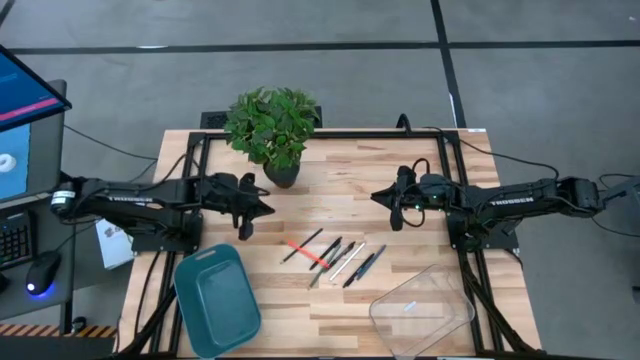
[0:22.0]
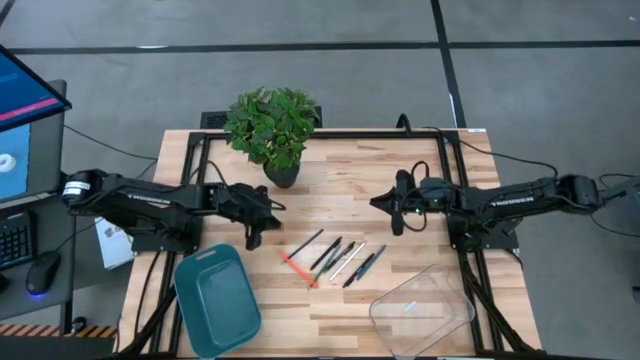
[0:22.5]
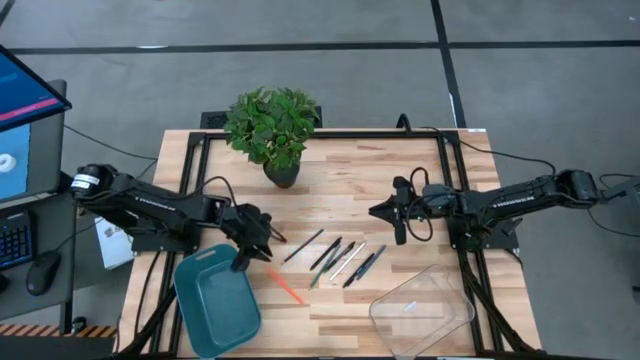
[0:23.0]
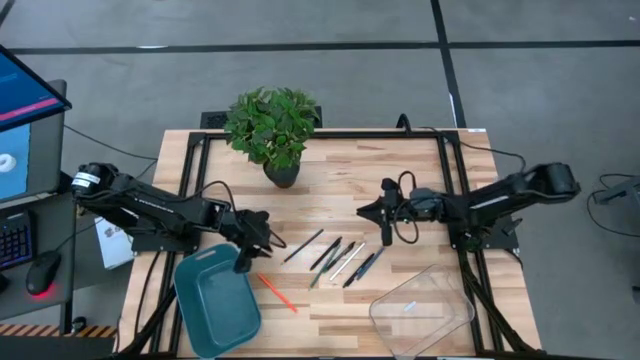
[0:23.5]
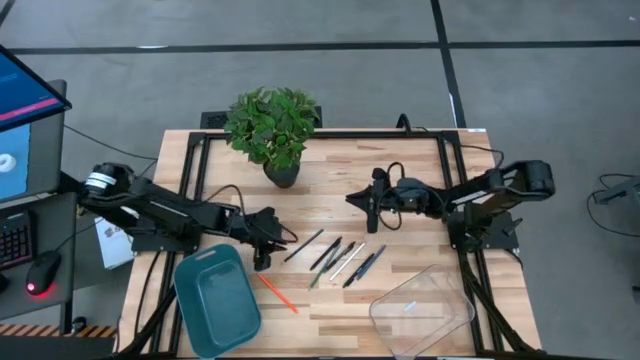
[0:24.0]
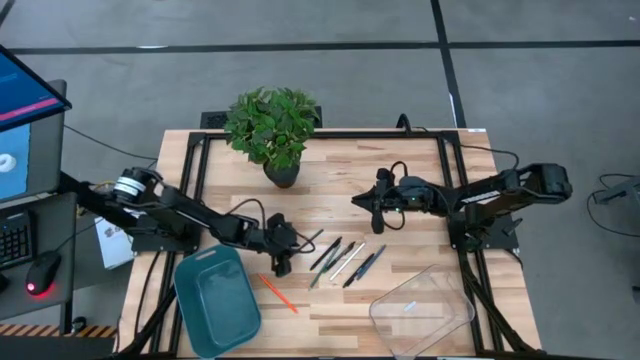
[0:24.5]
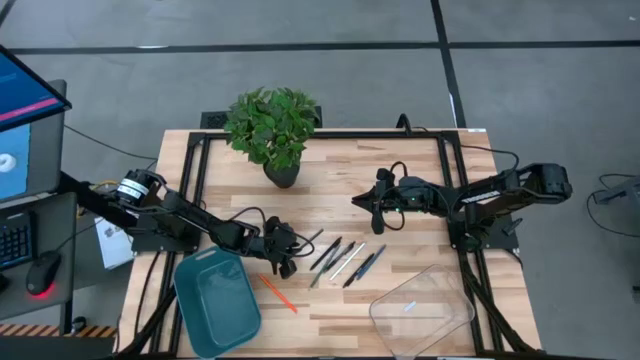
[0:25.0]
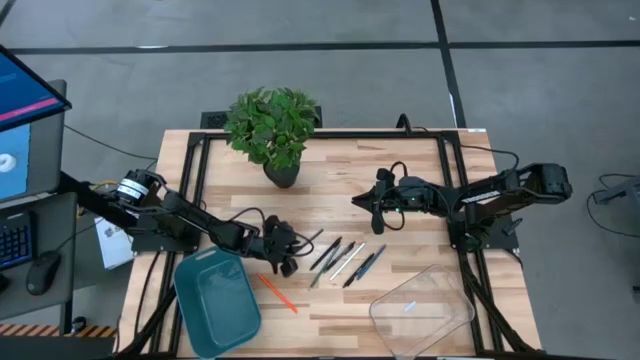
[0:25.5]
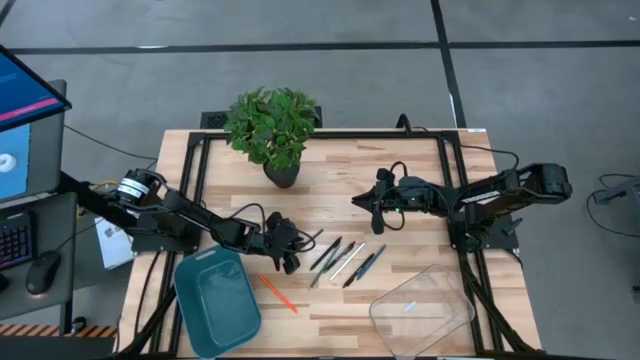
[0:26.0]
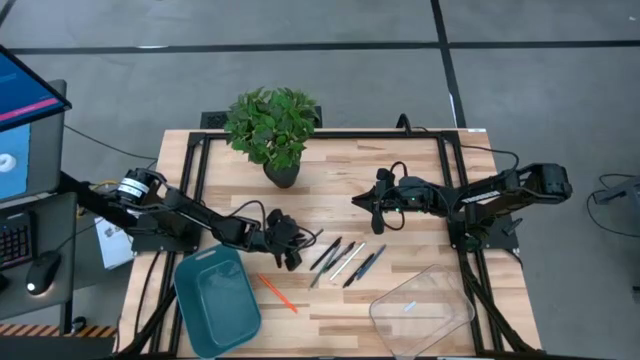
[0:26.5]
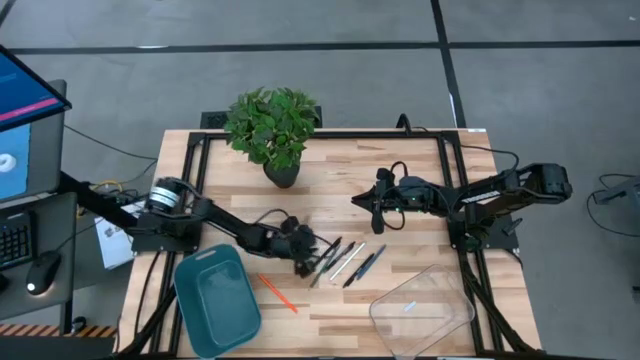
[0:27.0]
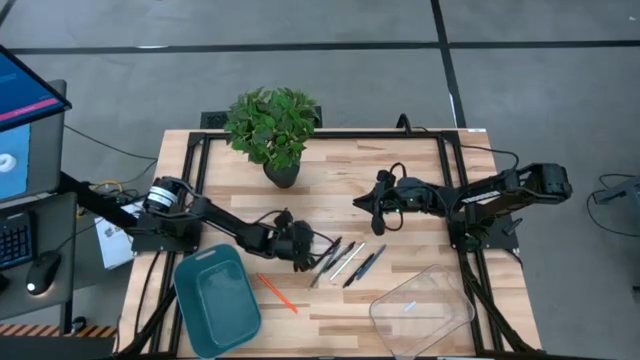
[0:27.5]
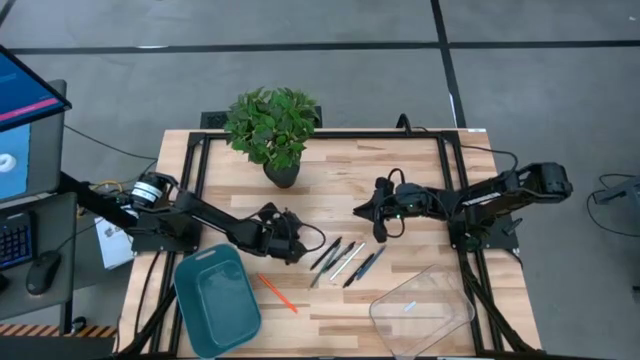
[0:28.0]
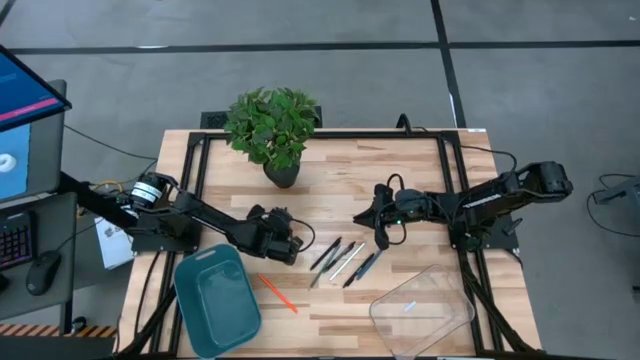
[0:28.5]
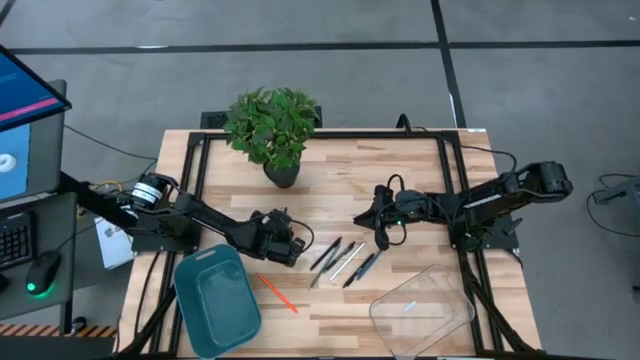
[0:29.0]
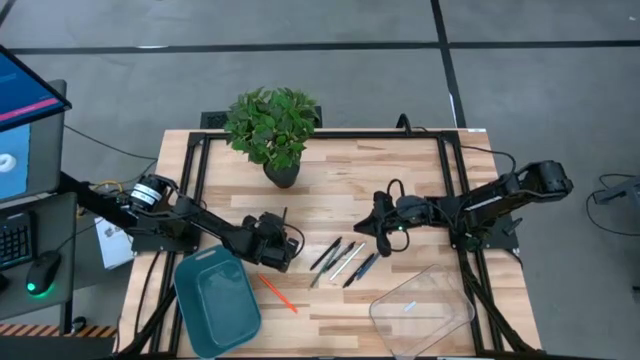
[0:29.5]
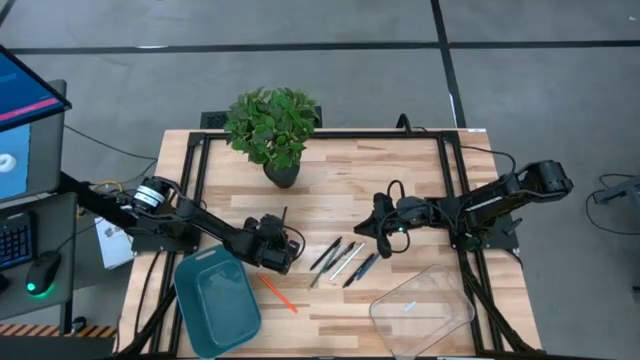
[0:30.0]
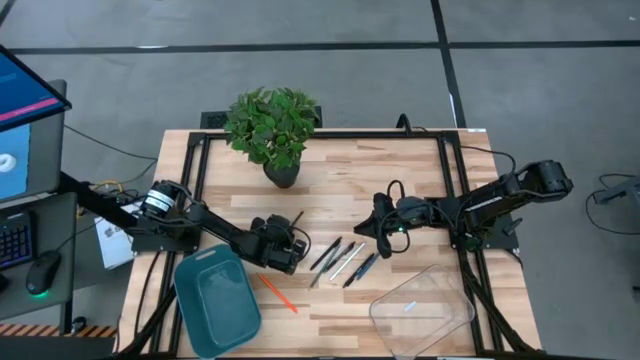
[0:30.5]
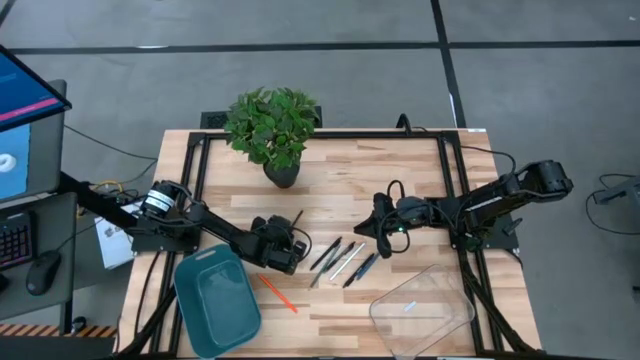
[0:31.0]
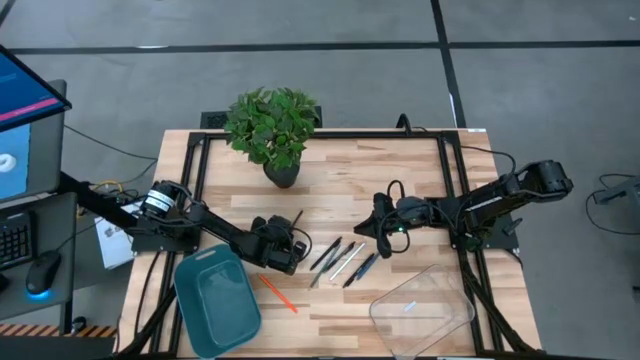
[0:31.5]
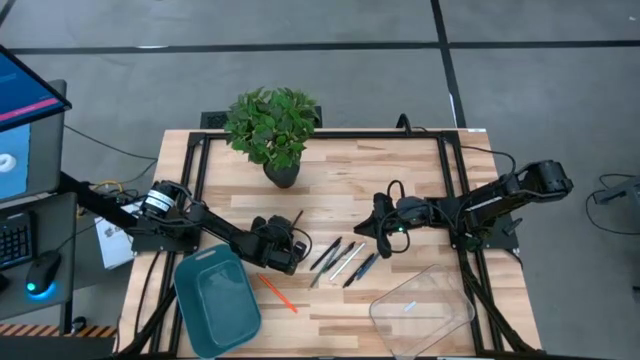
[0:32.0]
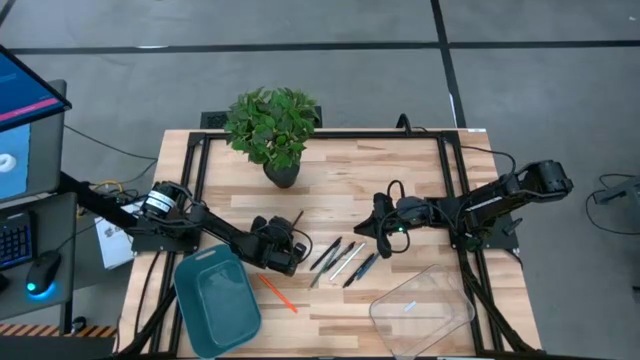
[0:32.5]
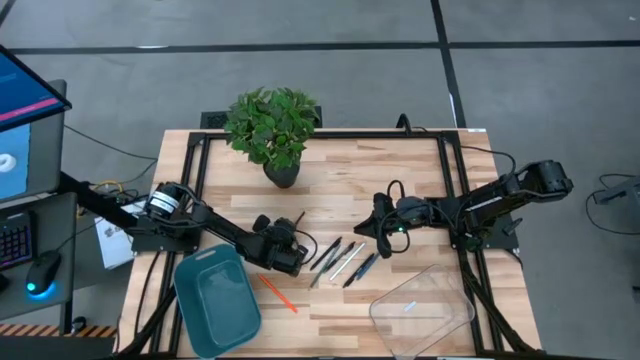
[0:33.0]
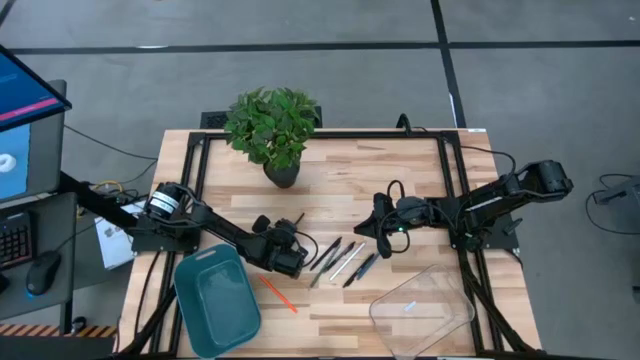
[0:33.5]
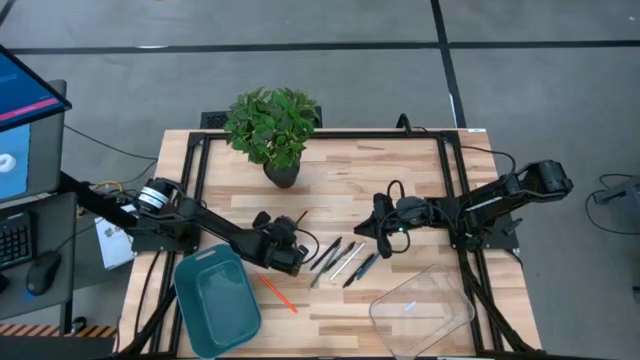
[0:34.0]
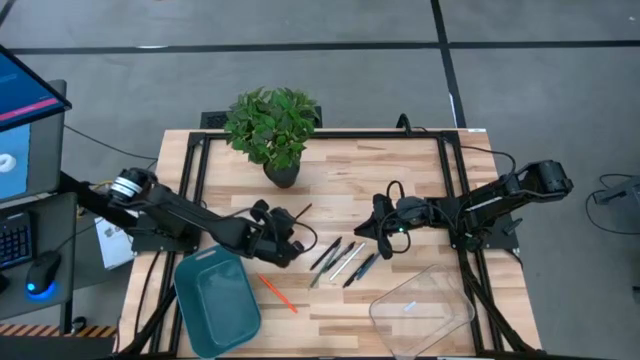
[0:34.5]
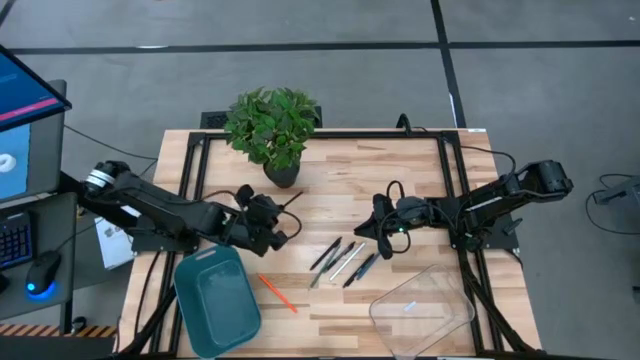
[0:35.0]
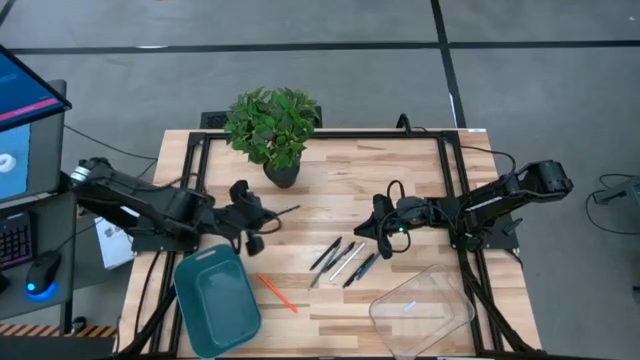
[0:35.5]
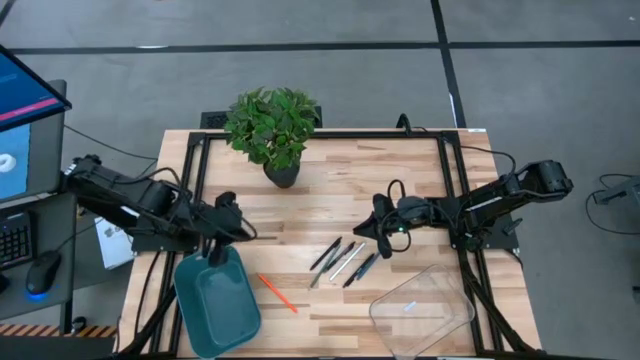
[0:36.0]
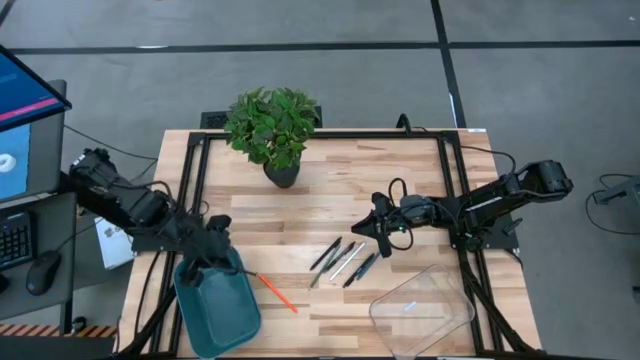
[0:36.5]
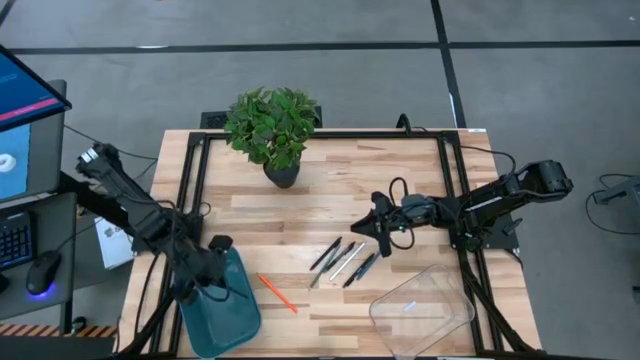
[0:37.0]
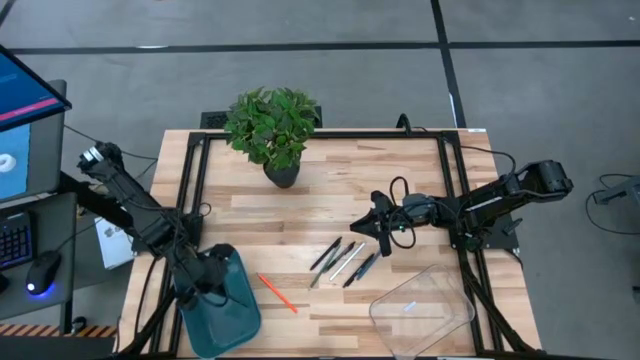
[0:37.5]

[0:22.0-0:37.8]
Task: Sort pens & pencils
Put the black pencil into the blue bin

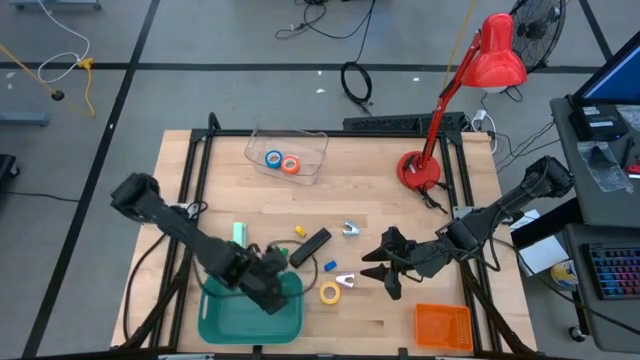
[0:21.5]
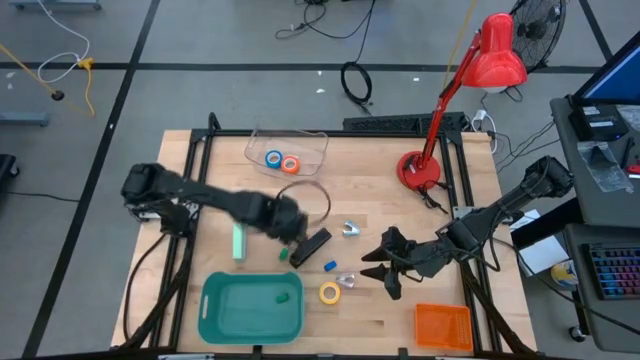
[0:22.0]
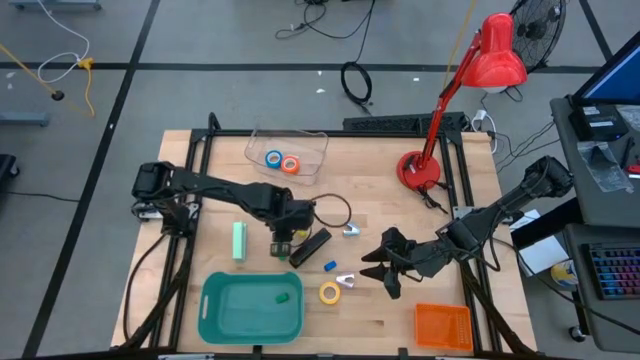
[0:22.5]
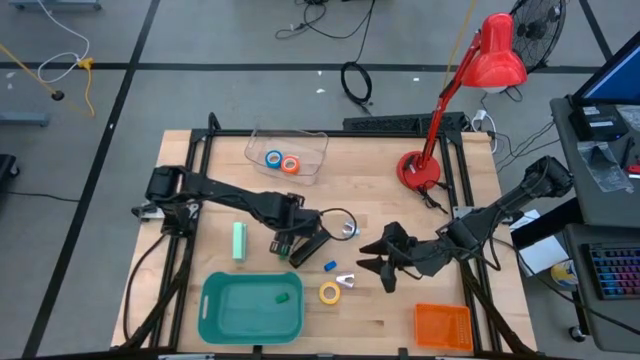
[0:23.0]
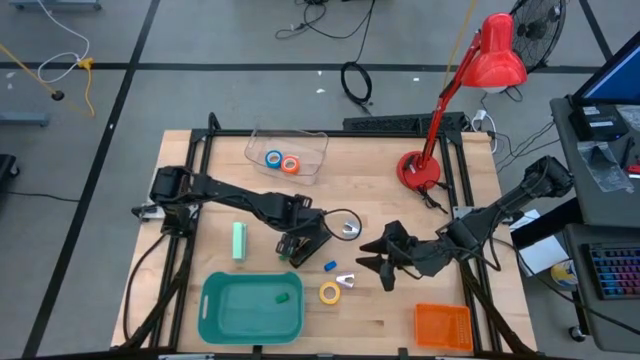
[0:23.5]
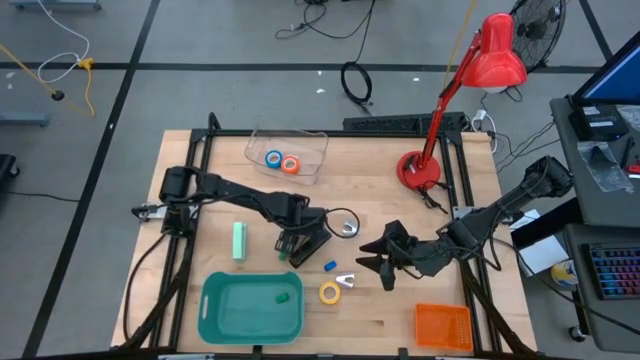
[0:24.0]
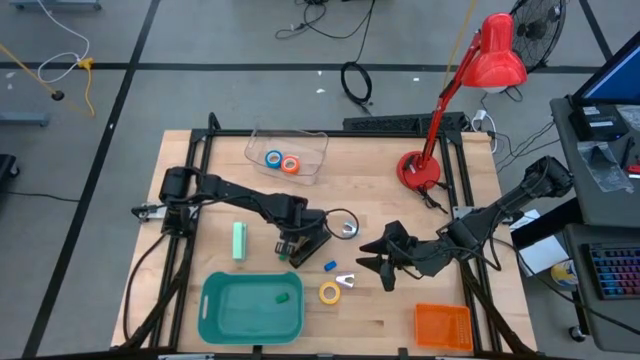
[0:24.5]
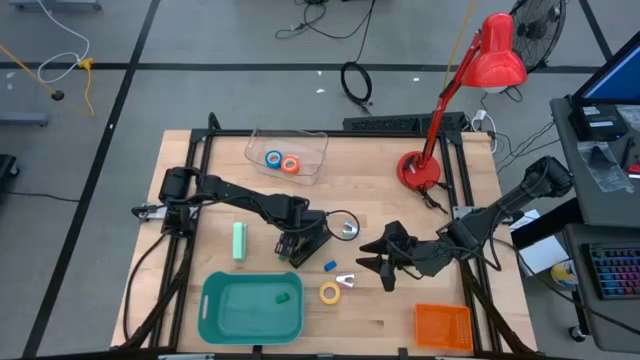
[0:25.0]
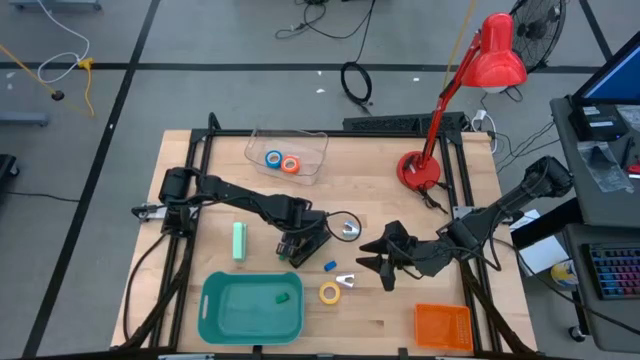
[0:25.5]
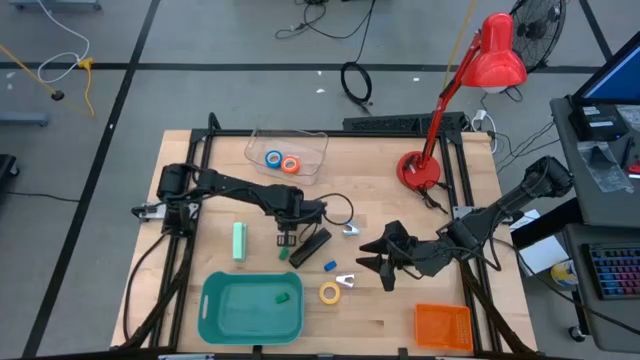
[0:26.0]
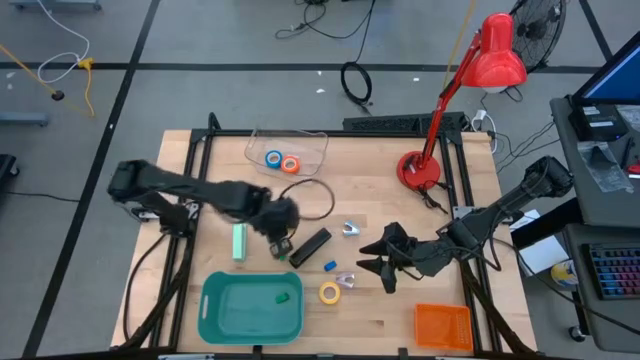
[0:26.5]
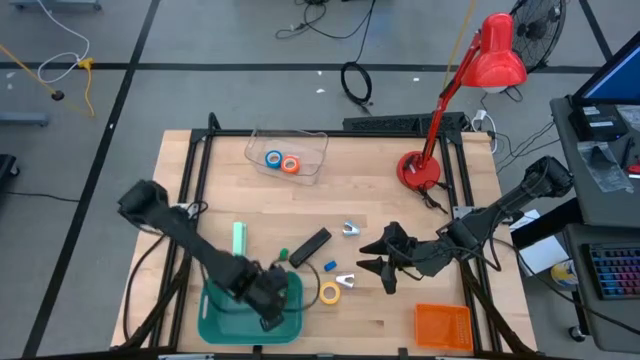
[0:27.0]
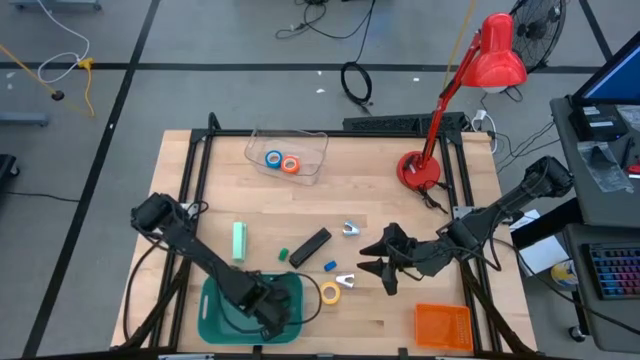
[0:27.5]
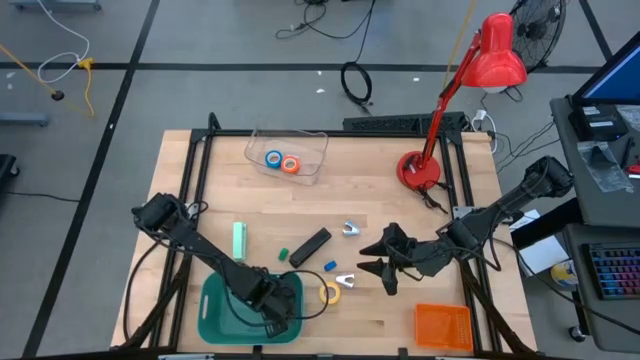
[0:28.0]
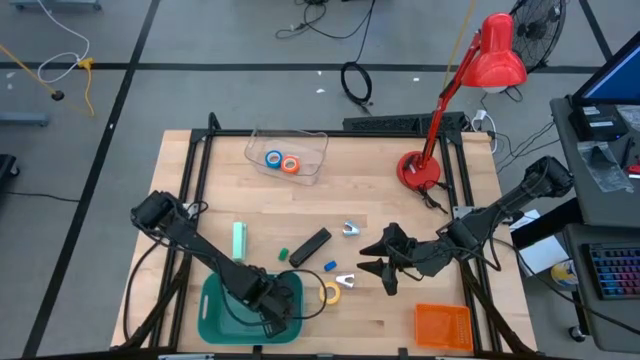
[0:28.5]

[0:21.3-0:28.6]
Task: Pick and place Stapler, Stapler remover, tape
Put the small yellow stapler into the green bin
